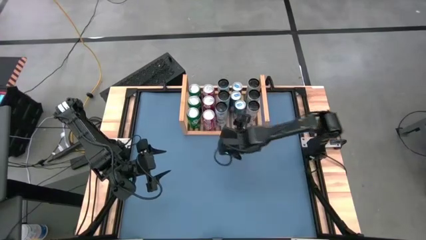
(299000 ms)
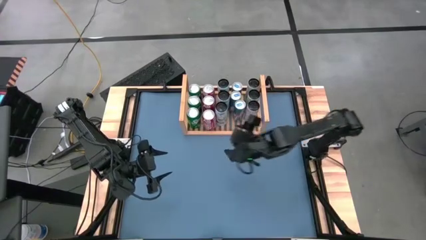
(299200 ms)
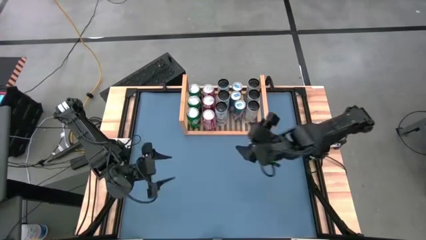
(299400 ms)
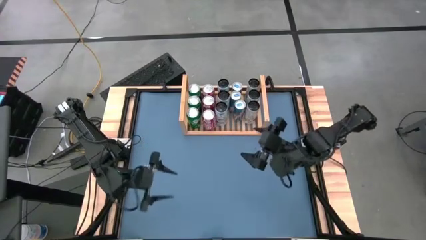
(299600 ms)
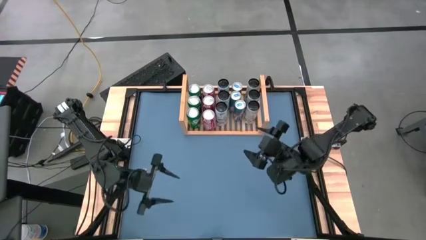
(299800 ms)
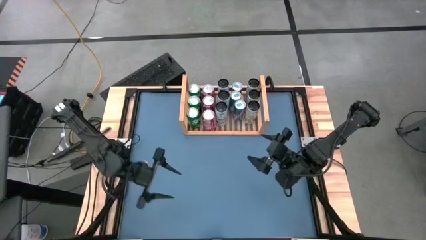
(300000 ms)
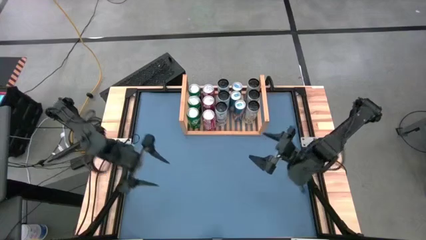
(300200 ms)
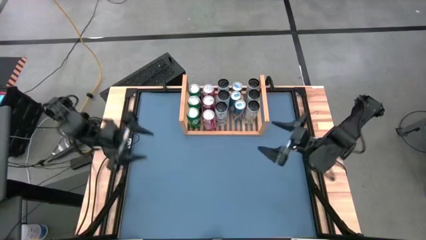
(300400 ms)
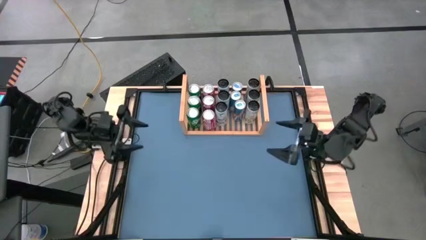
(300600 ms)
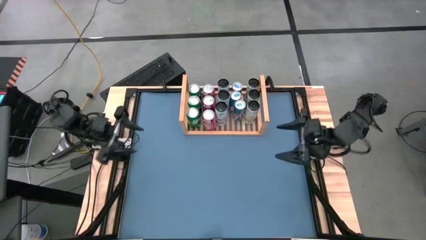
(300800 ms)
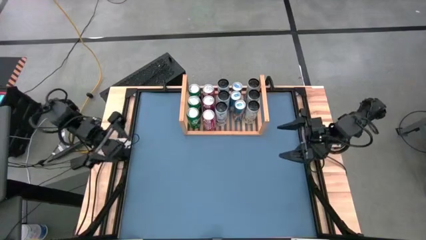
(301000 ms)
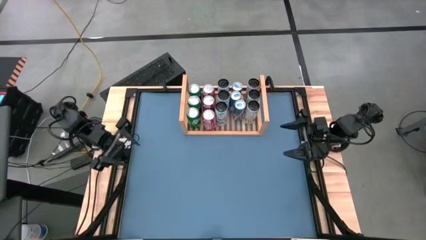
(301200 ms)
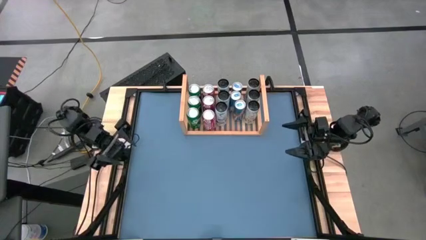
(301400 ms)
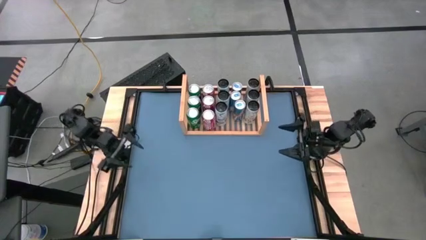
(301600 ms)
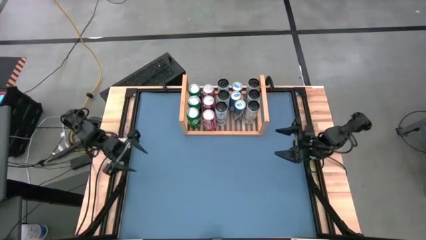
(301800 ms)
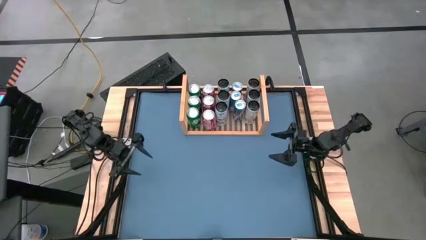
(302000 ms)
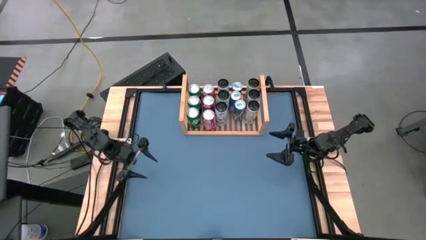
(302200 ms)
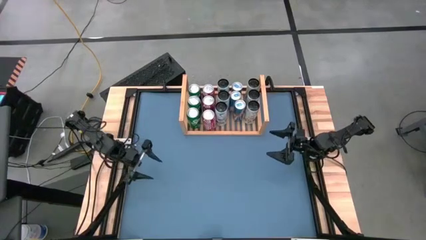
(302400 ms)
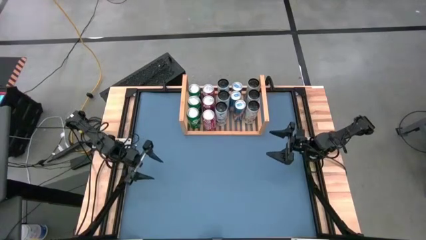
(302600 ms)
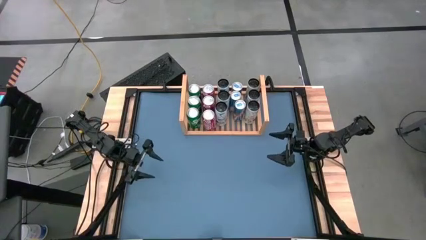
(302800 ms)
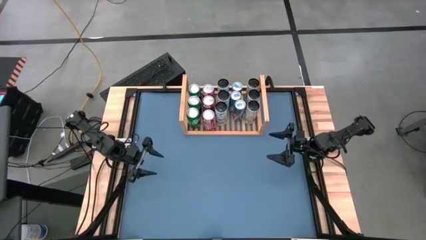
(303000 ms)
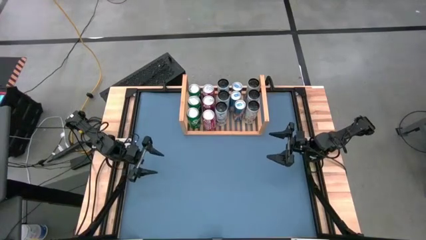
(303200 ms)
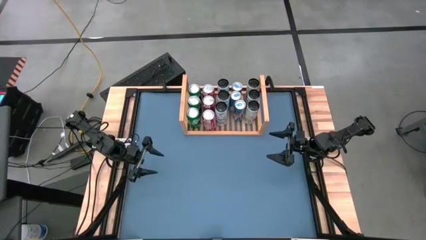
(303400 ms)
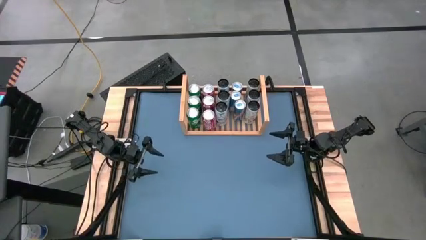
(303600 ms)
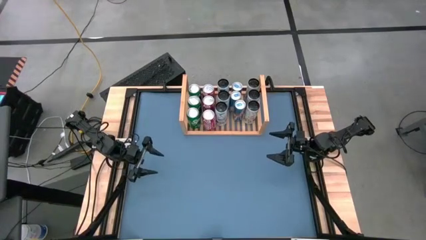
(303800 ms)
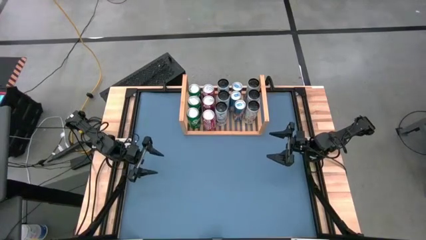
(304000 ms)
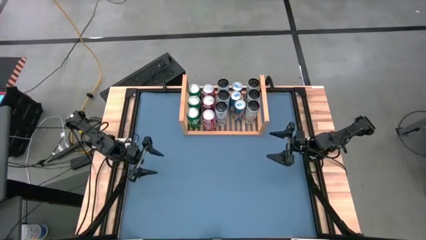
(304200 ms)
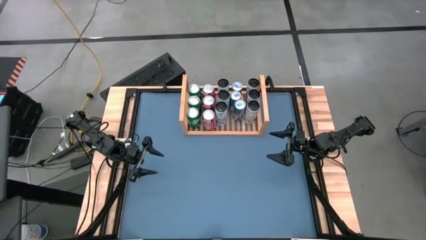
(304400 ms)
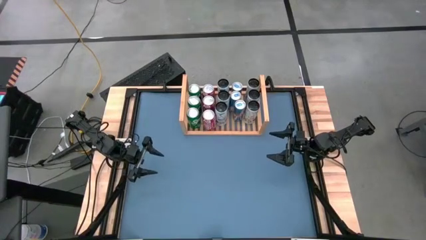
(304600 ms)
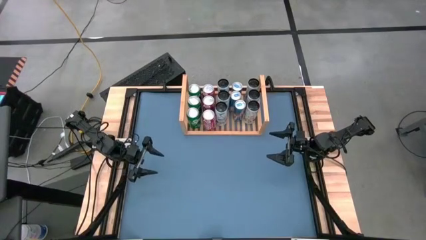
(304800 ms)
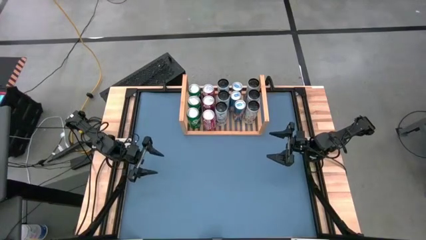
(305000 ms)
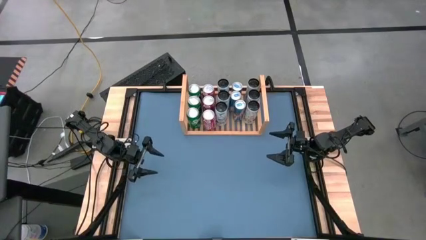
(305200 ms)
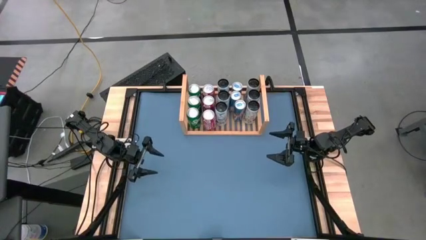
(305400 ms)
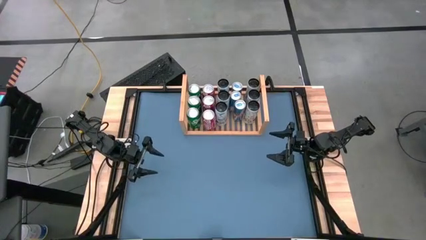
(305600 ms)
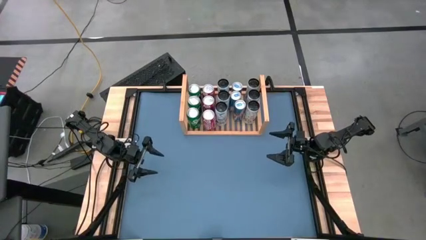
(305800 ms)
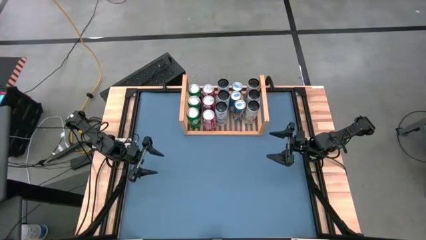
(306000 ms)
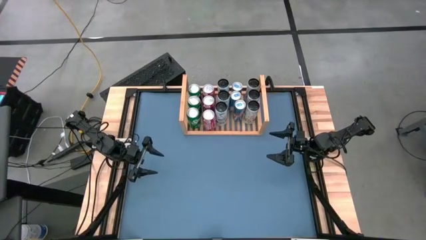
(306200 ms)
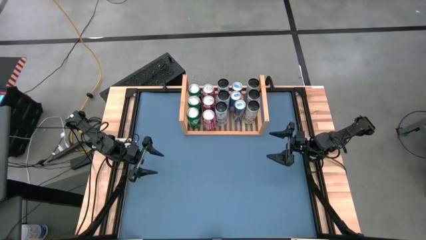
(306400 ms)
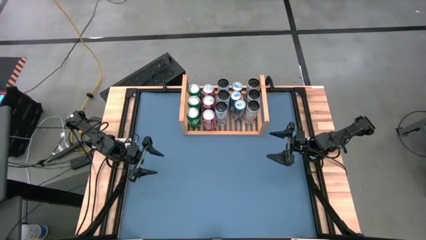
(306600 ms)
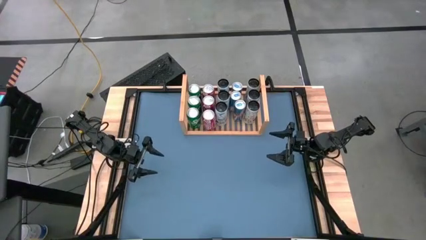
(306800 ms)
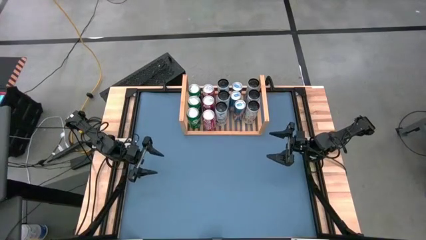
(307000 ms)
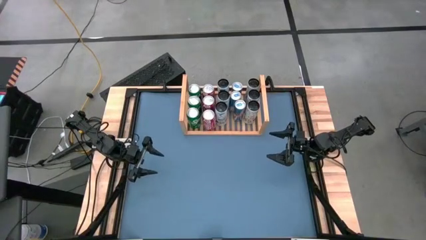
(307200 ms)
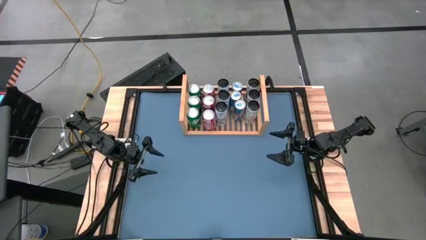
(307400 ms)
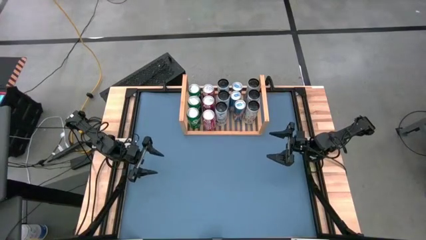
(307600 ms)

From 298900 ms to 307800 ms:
Task: Place canned beverage on shelf
Return to Home Position

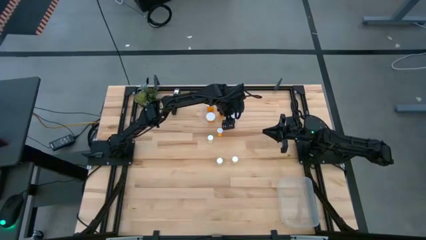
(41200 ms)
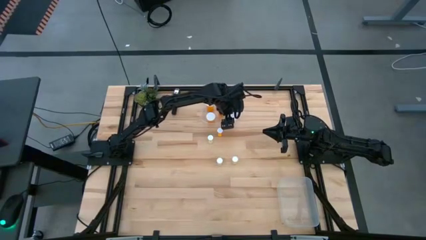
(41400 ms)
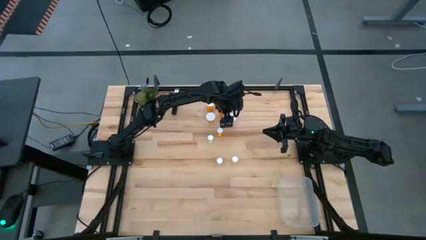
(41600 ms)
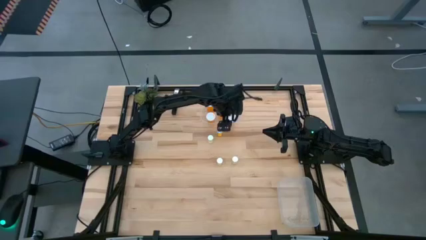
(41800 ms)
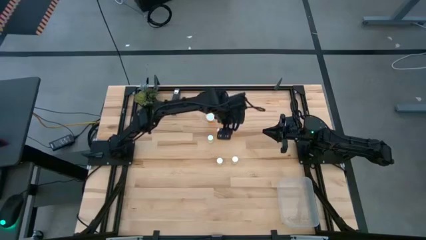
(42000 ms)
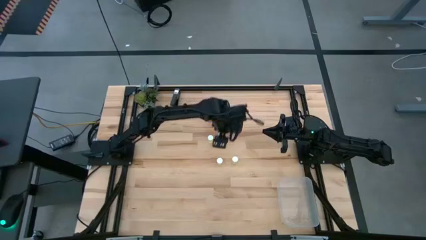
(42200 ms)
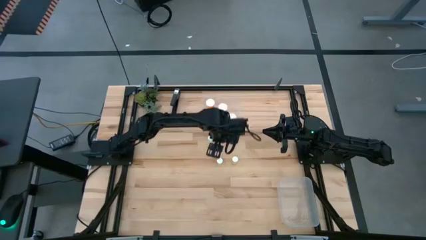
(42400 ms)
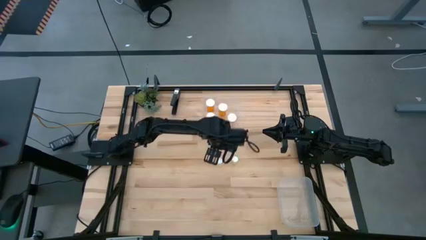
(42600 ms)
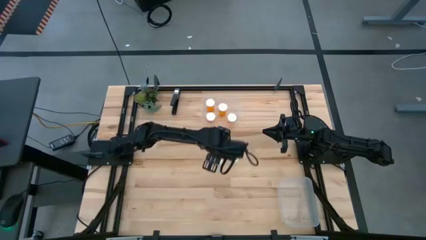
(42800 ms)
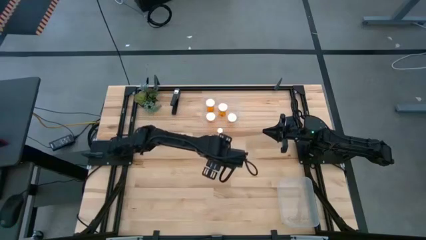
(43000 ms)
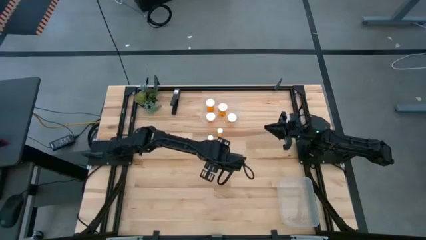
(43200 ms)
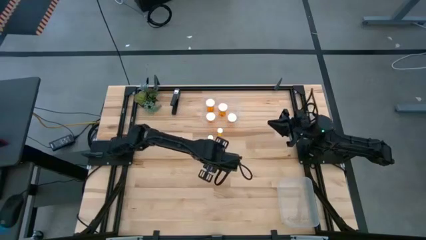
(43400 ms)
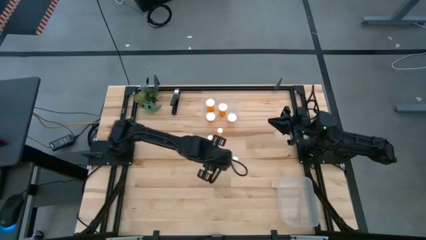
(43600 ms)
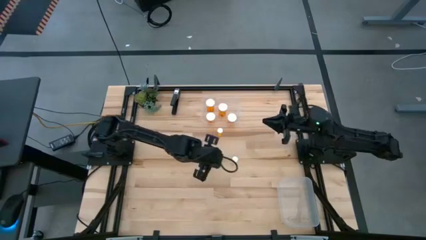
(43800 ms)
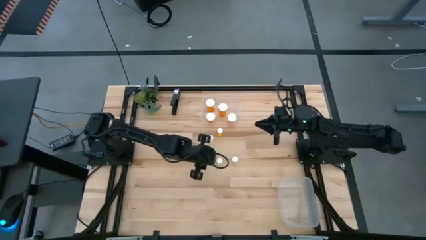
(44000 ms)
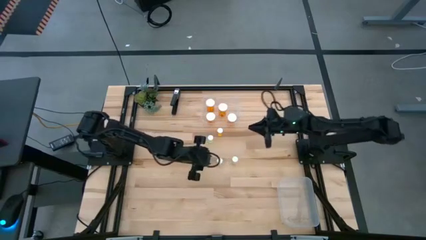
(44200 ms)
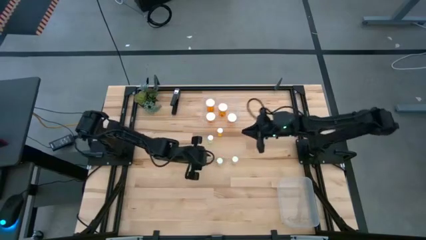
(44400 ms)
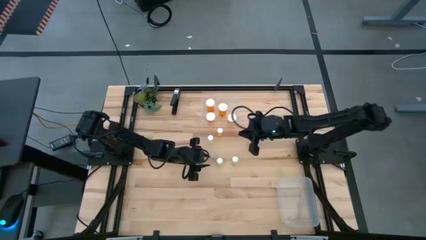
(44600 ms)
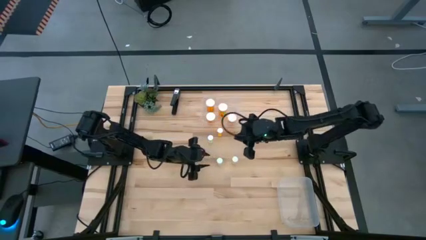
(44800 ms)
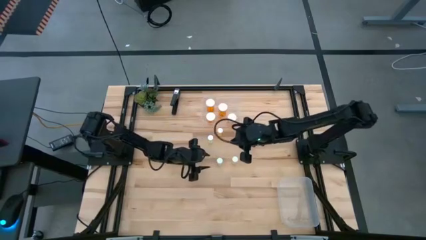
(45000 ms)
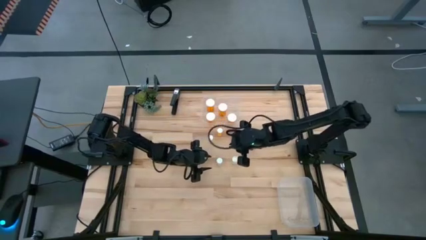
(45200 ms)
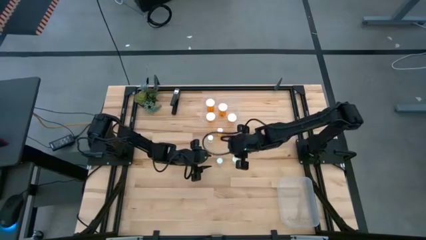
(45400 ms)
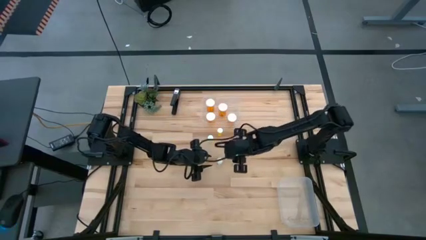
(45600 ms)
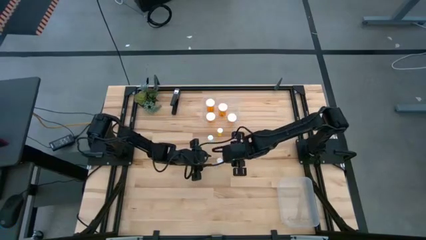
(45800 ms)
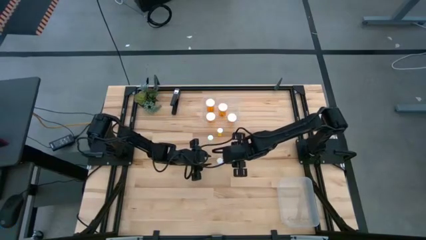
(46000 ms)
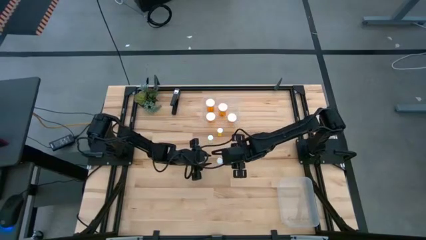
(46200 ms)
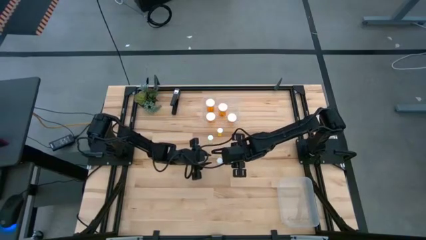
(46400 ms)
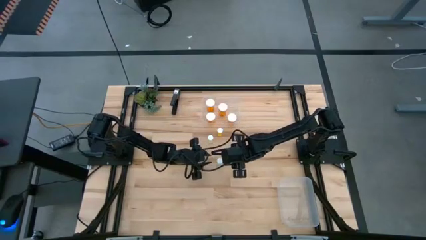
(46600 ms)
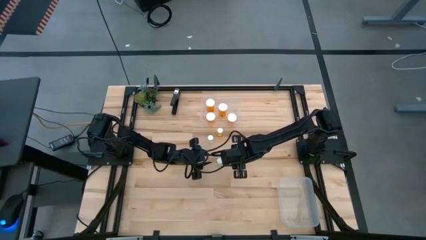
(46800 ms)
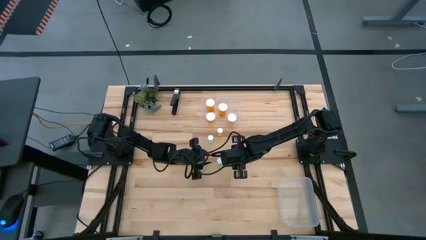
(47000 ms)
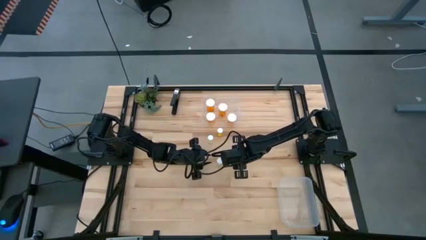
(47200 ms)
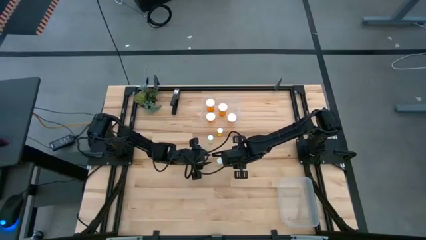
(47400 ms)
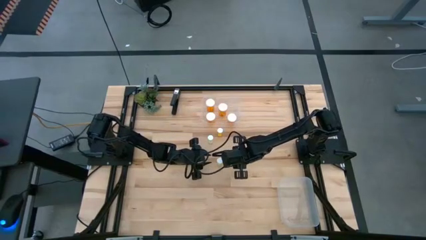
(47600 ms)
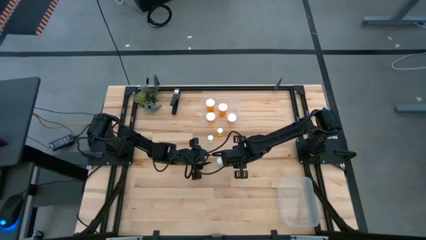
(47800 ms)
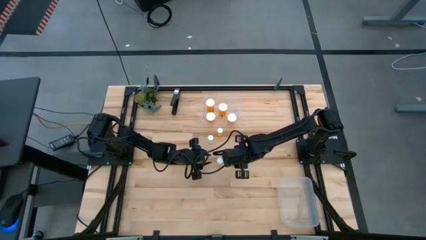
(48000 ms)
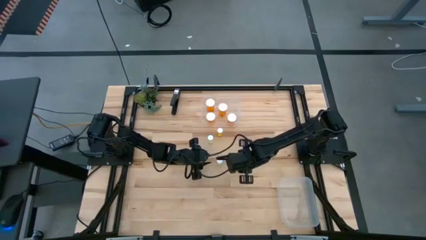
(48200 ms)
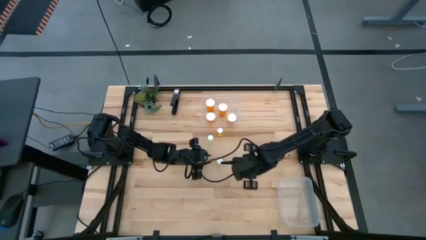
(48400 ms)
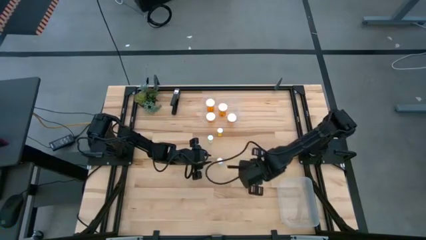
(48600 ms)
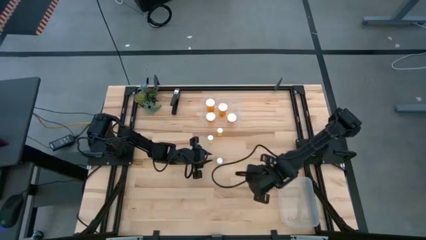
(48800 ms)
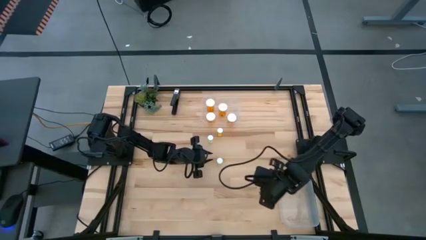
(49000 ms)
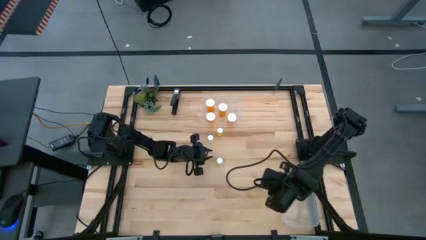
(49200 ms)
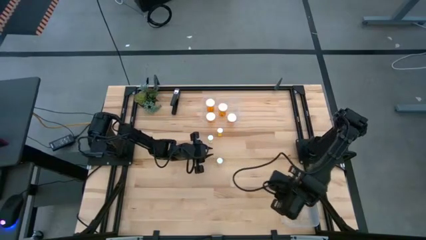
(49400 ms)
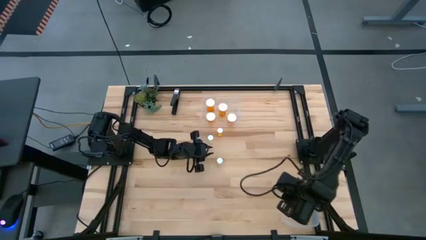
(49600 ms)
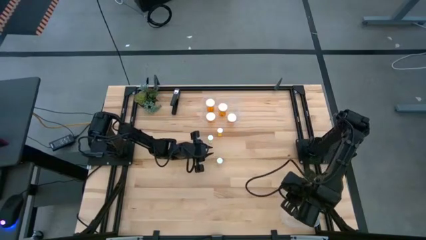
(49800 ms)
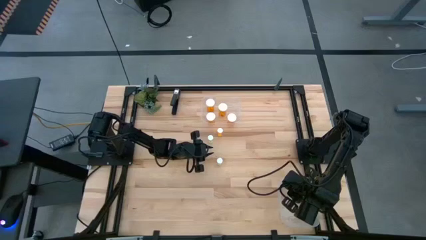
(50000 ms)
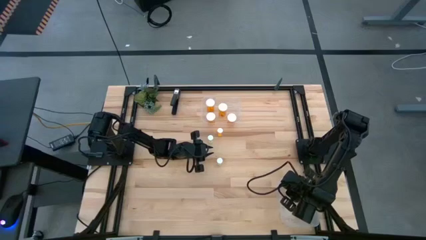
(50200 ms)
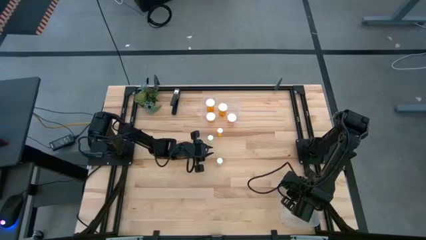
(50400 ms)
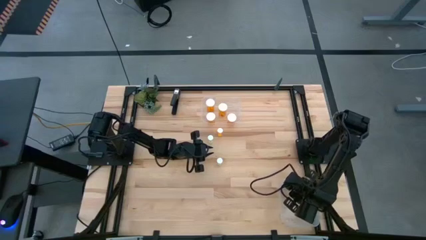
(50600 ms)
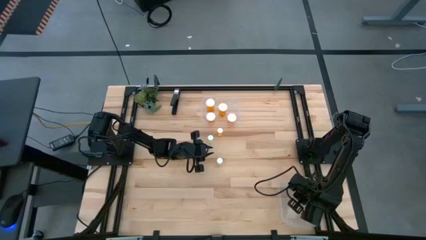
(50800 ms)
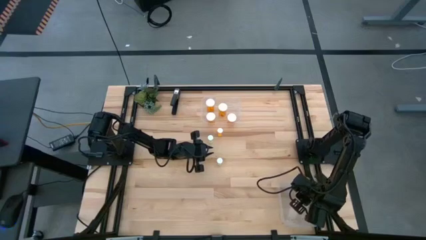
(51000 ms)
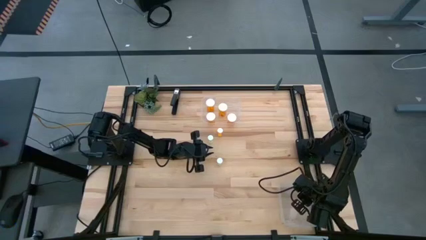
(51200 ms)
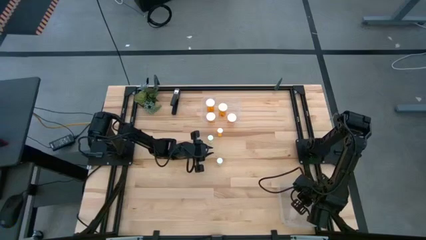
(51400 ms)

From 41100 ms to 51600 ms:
Task: Pick and place medicine bottles into bin by pill shape (circle, oval)
Put the yellow tablet bottle into the bottom transparent bin
